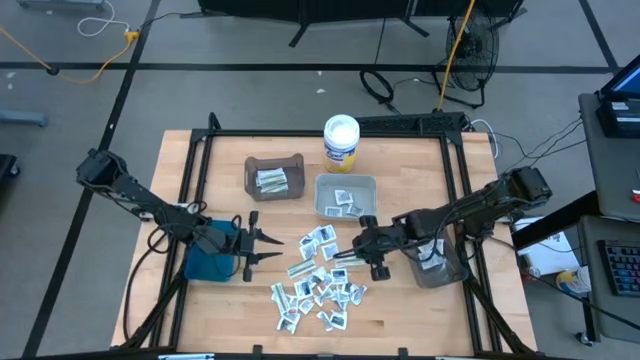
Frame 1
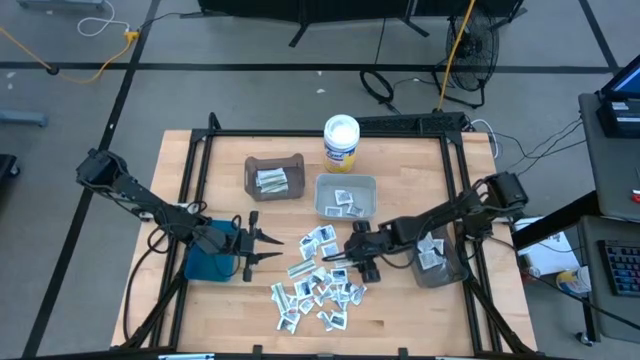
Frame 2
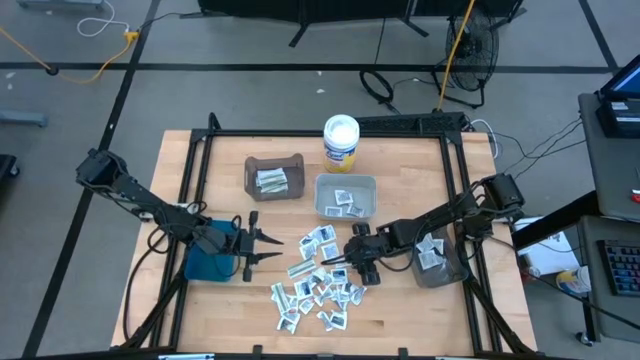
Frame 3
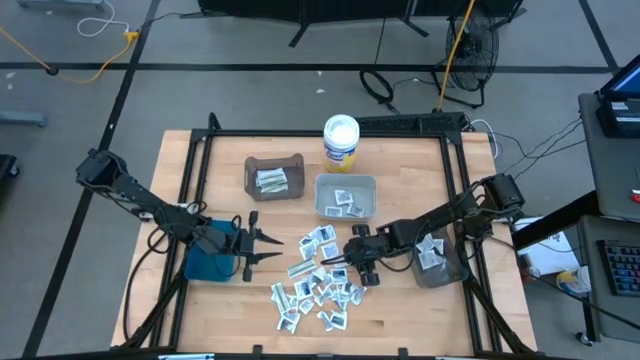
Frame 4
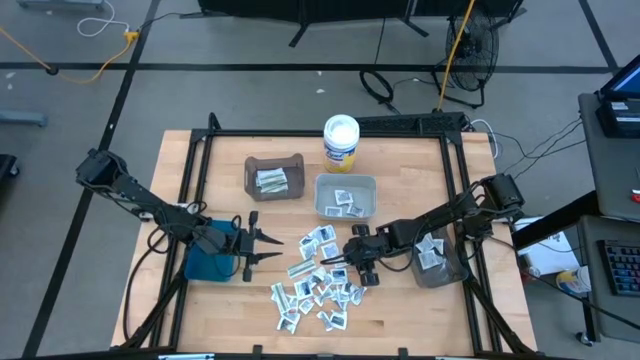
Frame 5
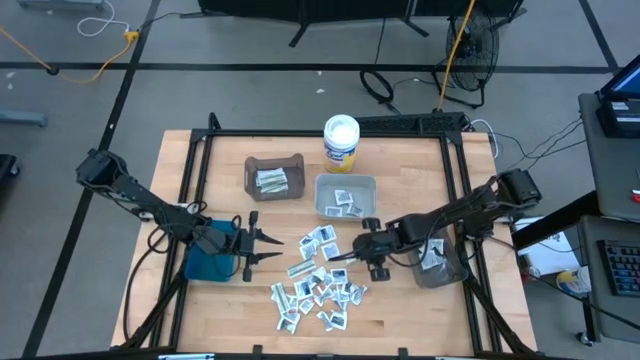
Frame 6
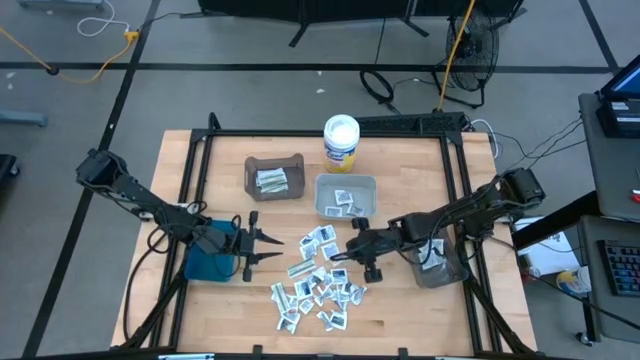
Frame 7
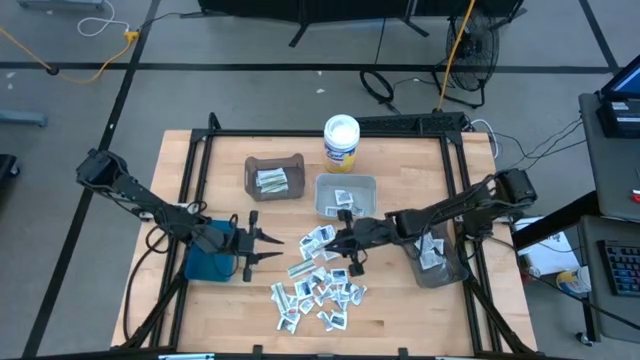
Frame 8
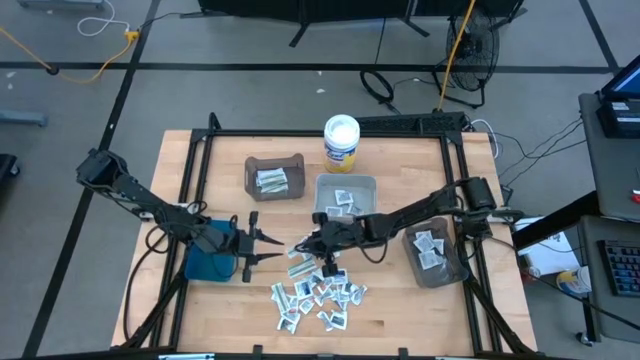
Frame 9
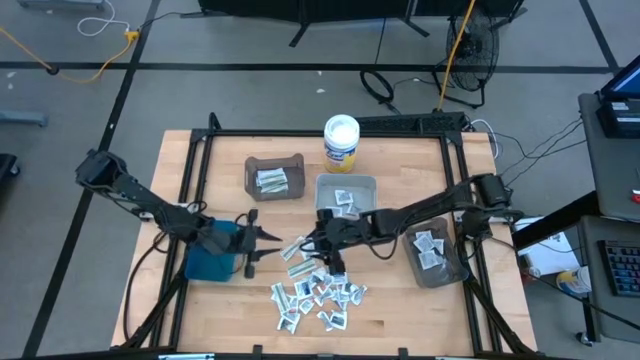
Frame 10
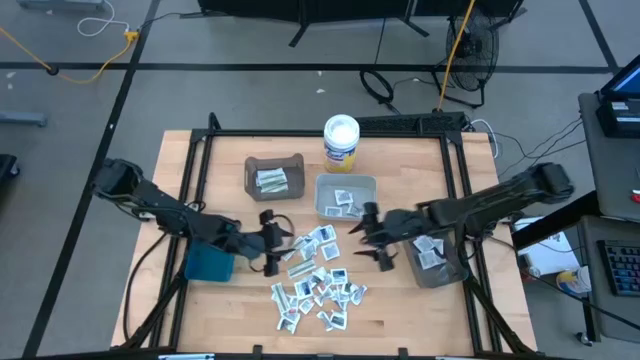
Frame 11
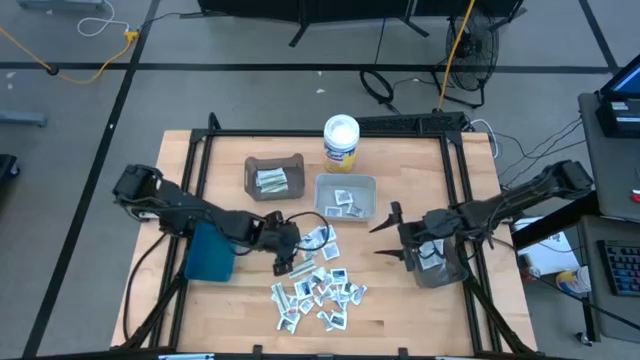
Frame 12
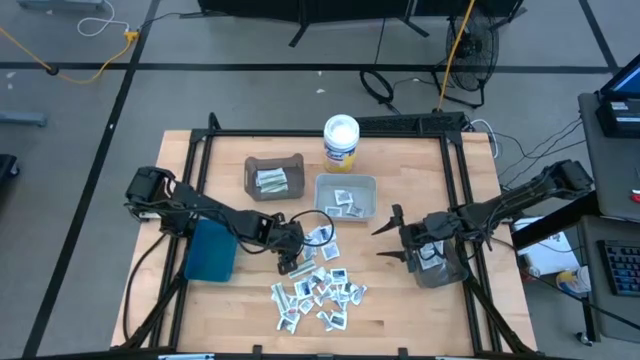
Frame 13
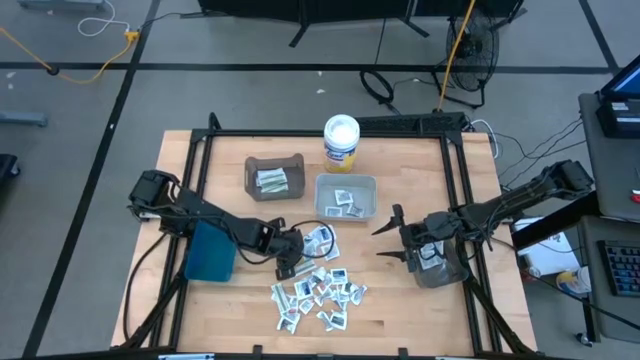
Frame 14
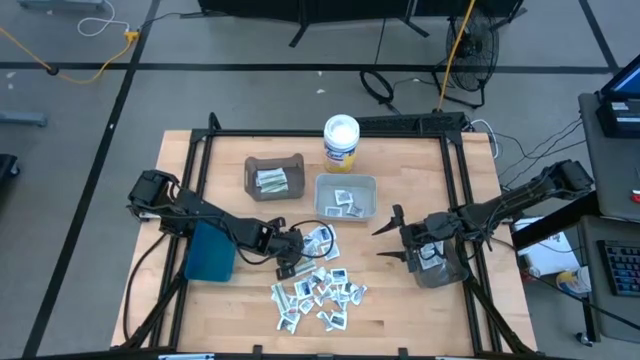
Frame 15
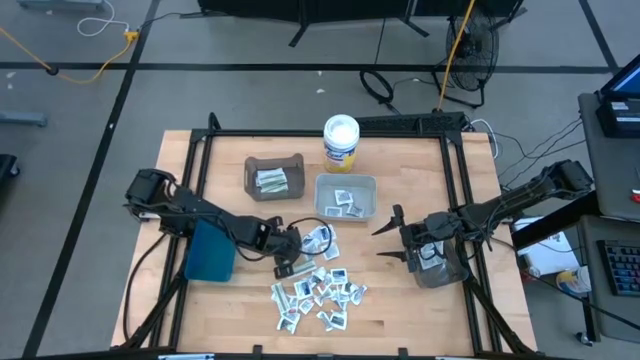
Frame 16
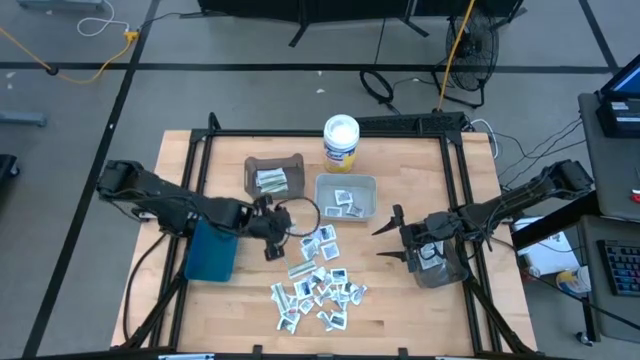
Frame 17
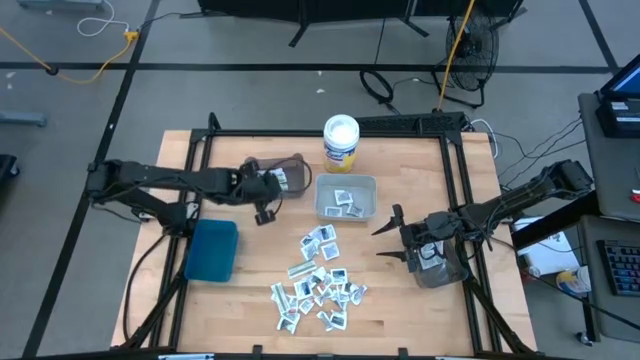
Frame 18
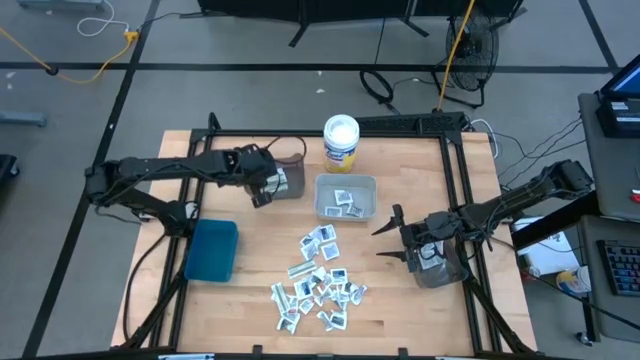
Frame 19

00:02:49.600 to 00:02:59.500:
Task: Pick & Place First Aid Supplies
Put the green bandage pack into the top black bin

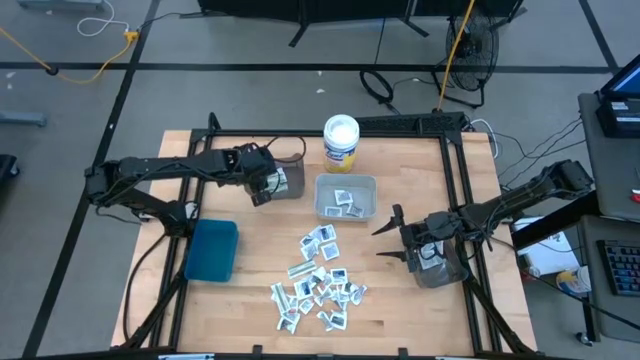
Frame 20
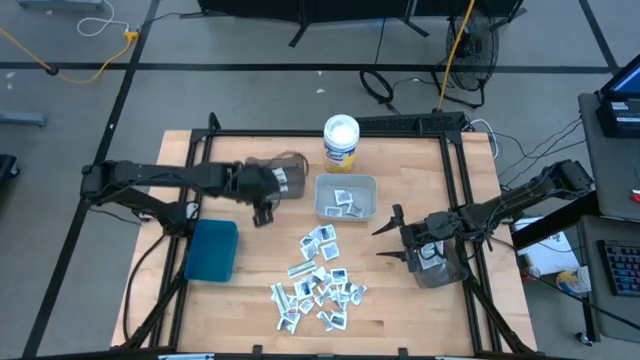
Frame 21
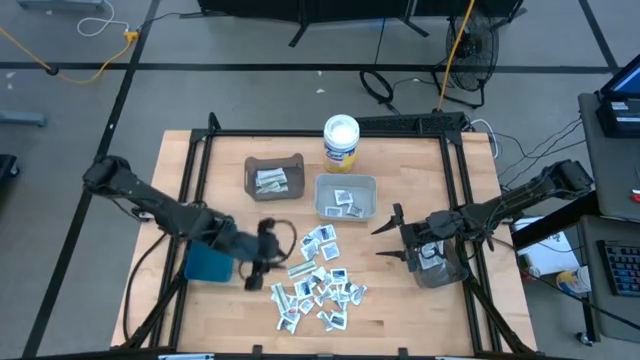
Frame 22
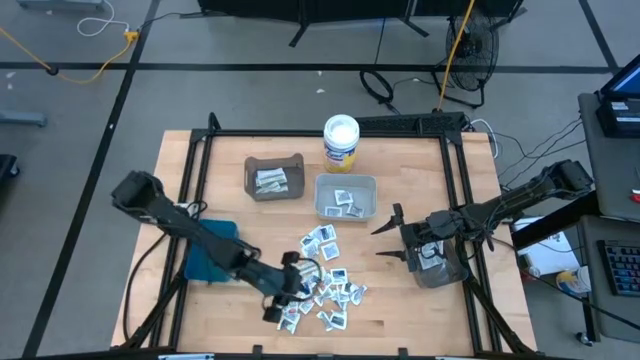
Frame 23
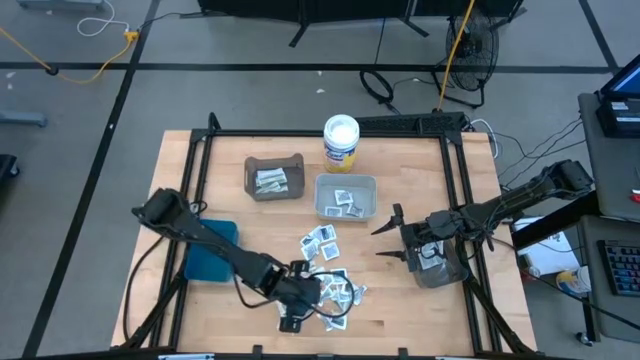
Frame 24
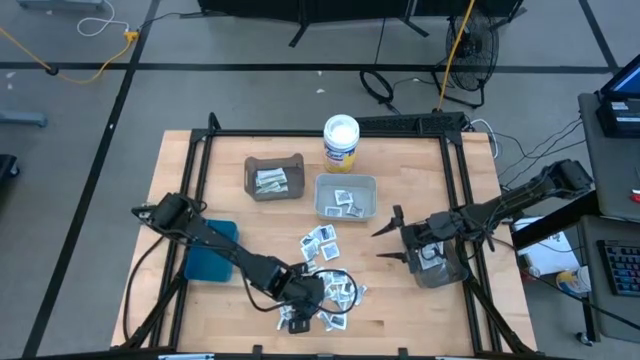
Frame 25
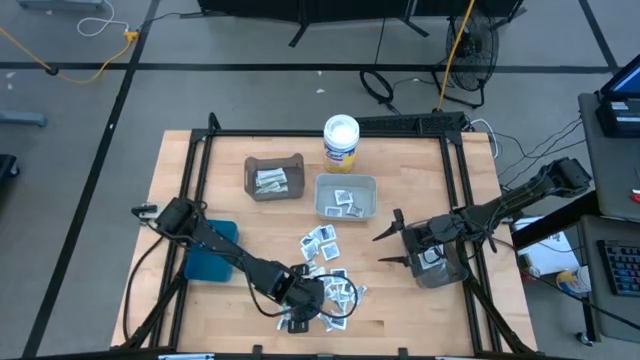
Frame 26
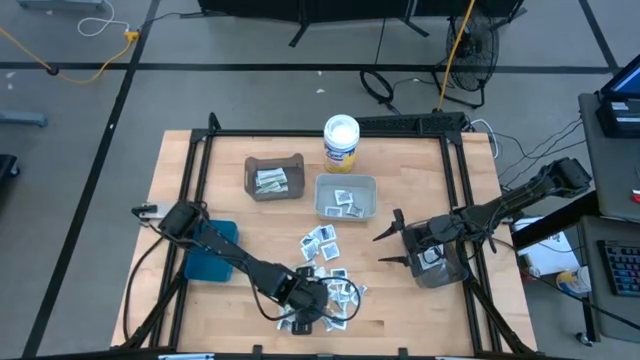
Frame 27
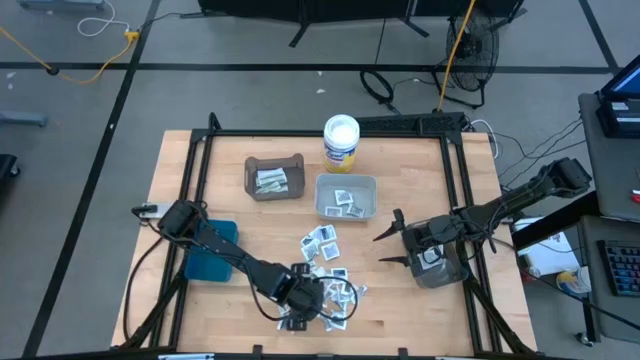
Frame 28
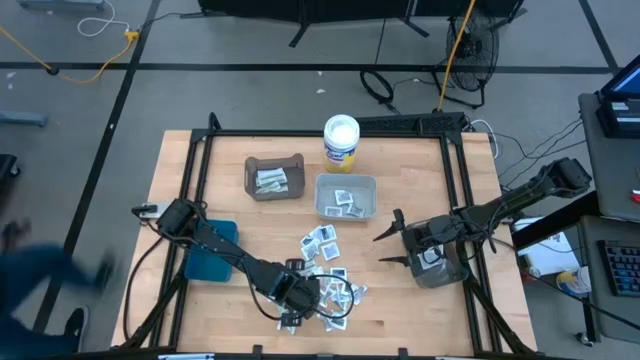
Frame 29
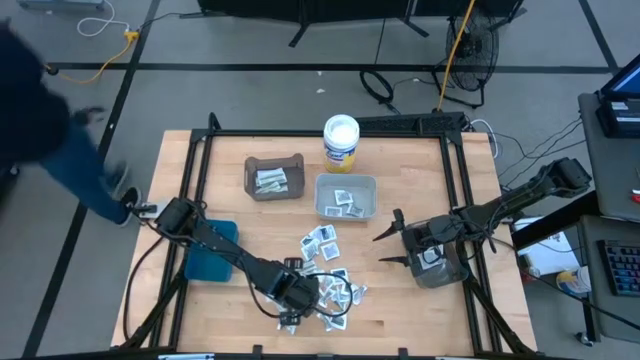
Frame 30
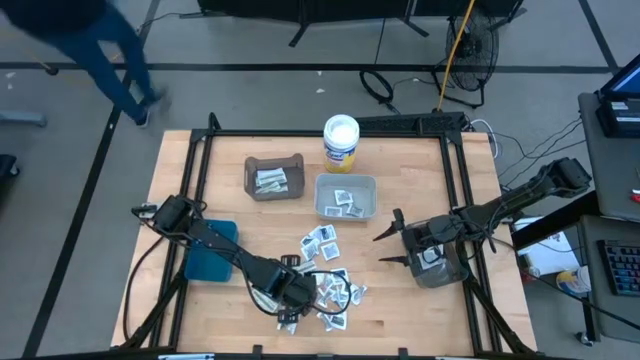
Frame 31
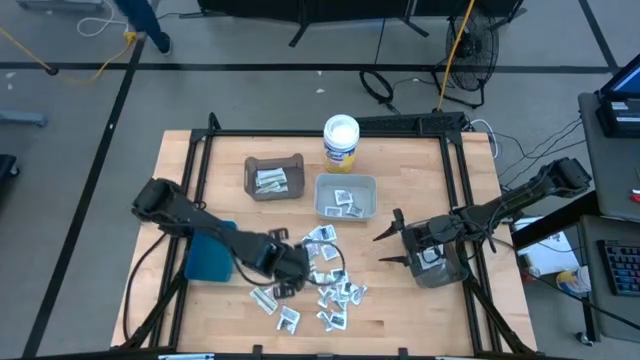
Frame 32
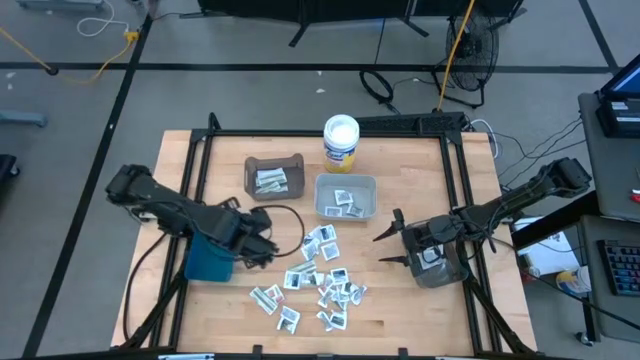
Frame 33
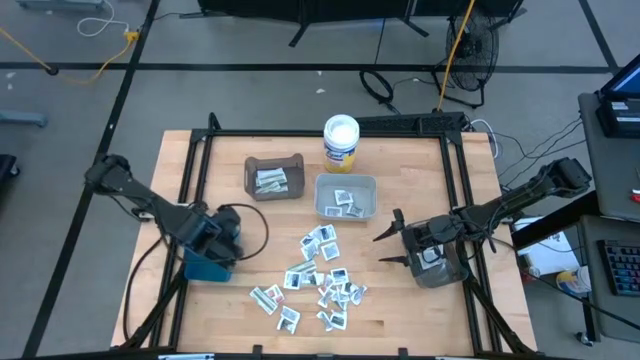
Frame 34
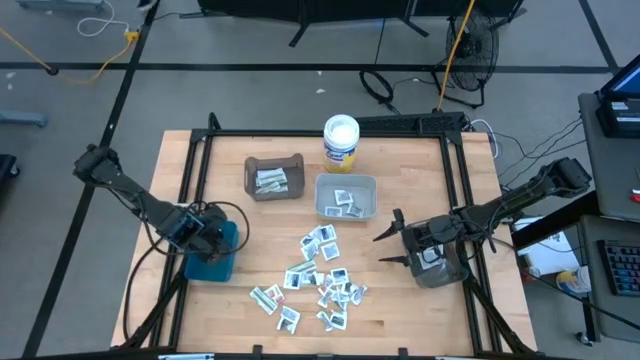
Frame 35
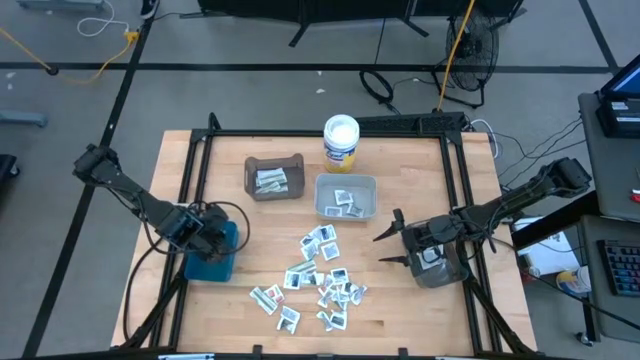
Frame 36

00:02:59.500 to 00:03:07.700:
Put the orange ointment pack into the blue bin

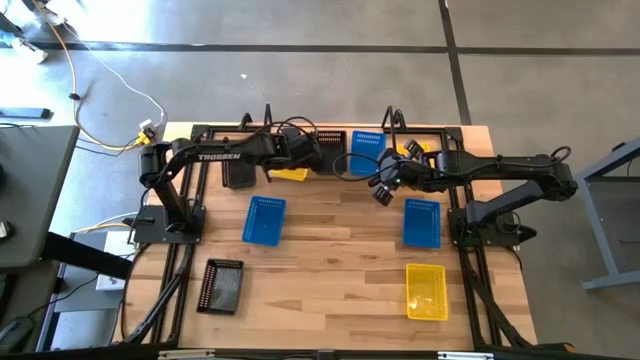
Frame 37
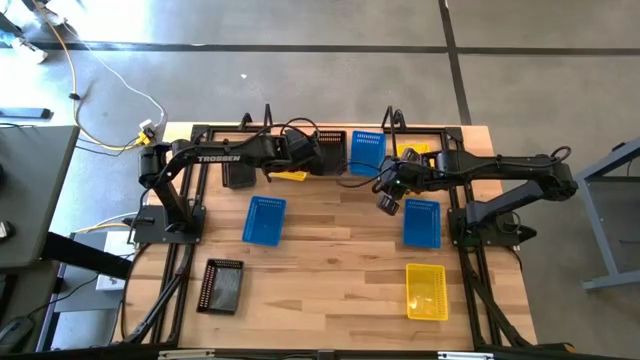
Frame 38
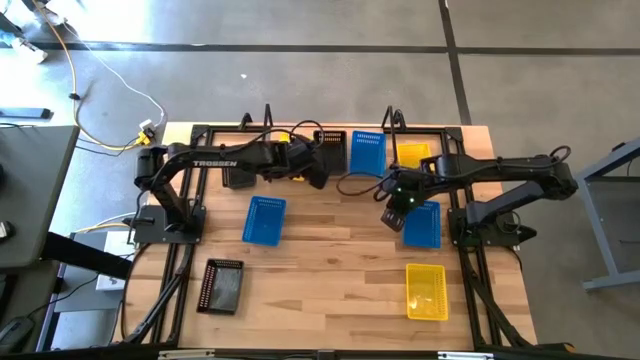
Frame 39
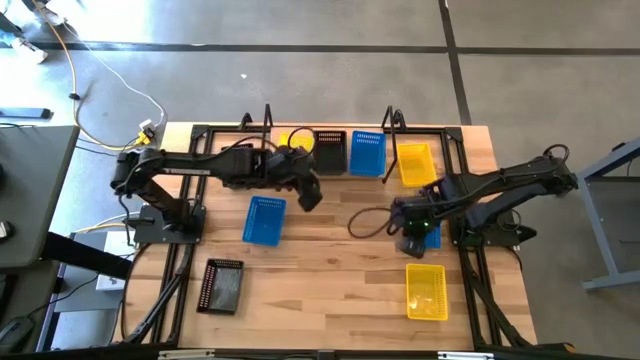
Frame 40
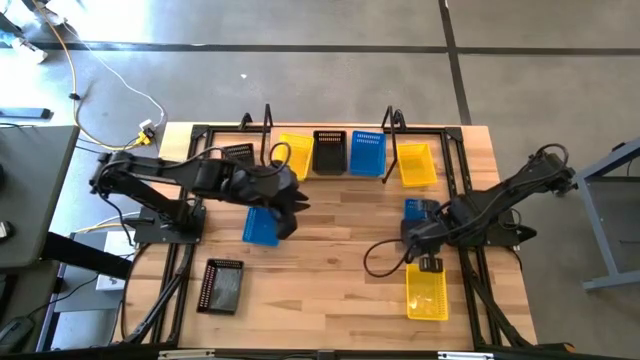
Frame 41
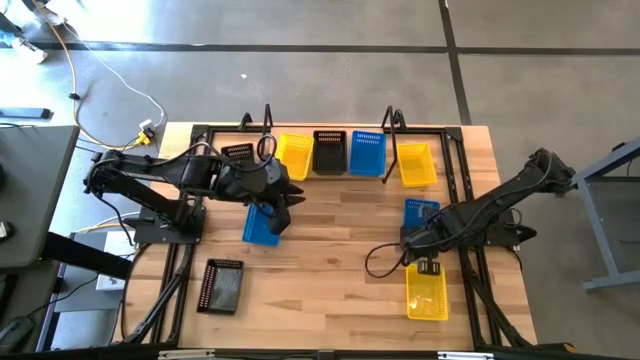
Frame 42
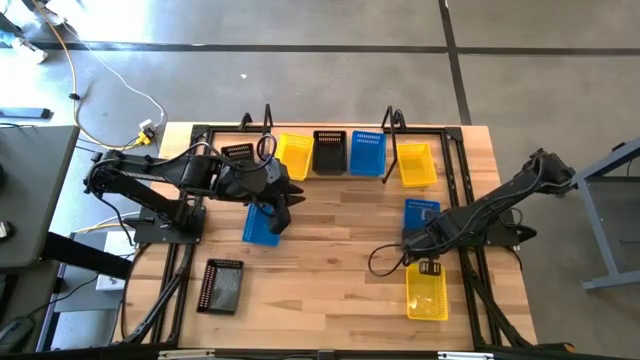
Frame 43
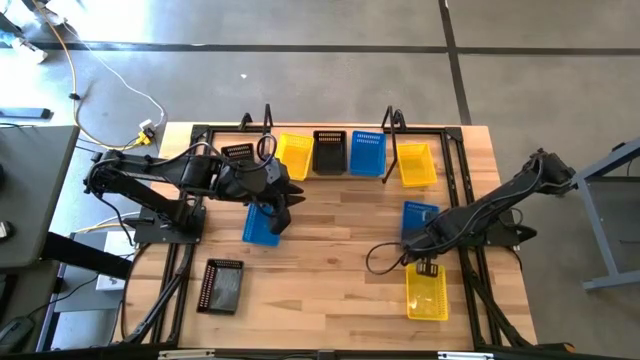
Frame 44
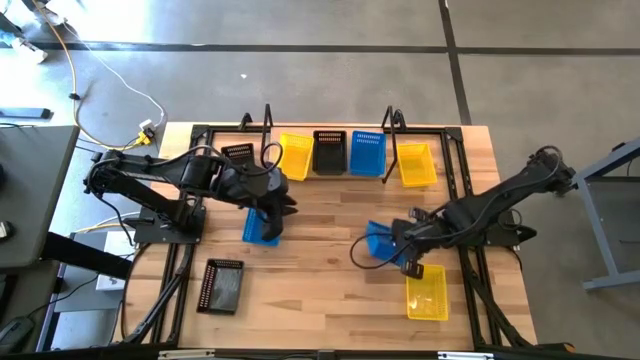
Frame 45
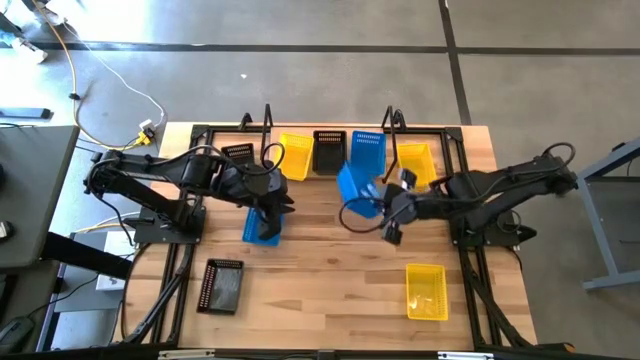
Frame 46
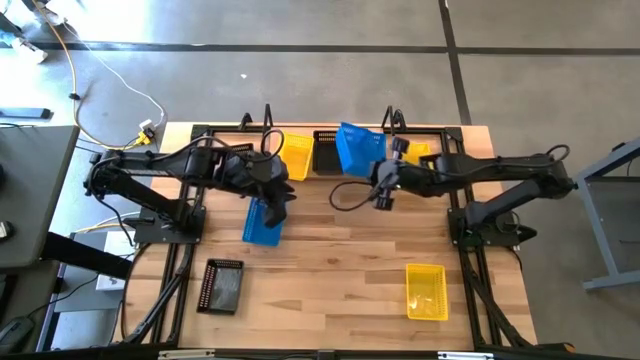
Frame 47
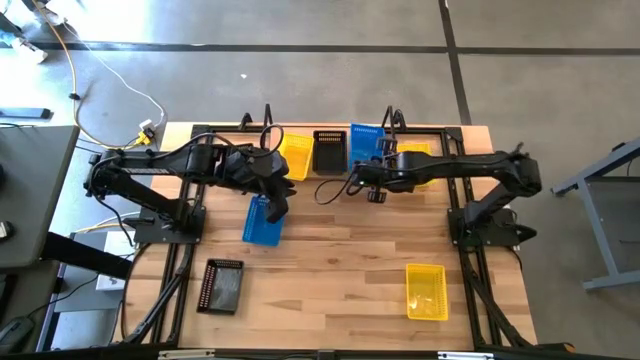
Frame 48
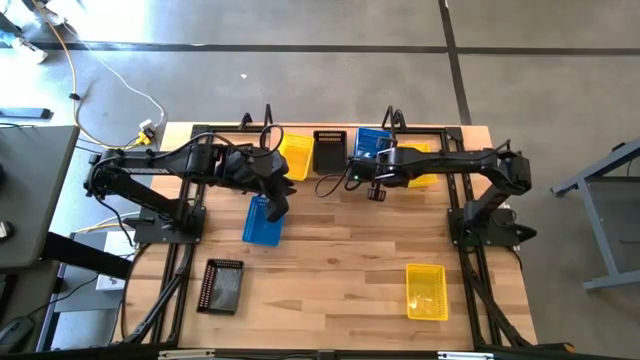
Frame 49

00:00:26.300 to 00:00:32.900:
Task: Stack baskets on shelf by color
Stack the right blue bin on top of the other blue bin on the shelf
